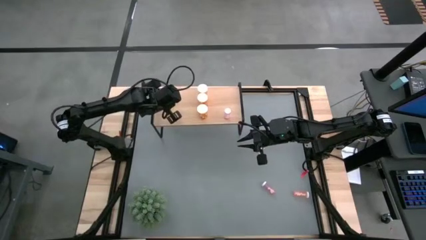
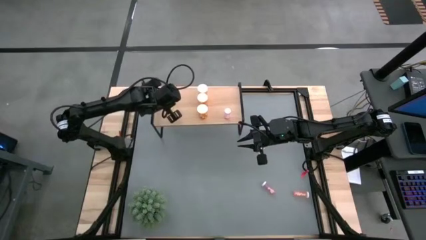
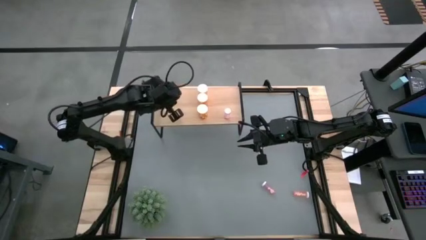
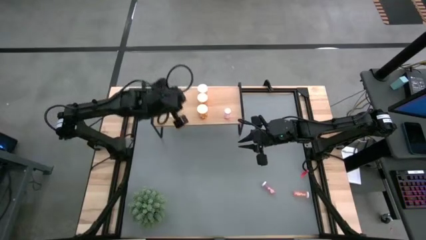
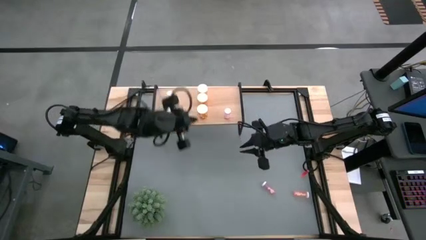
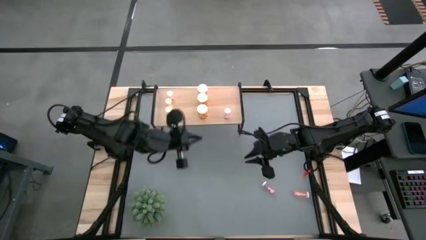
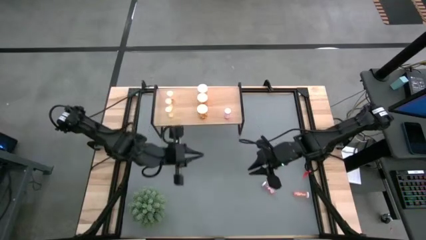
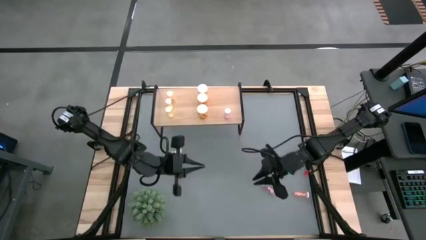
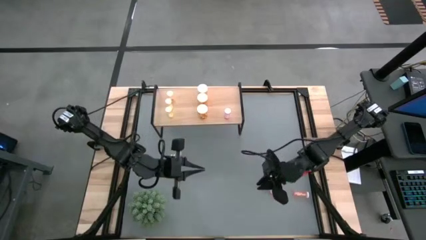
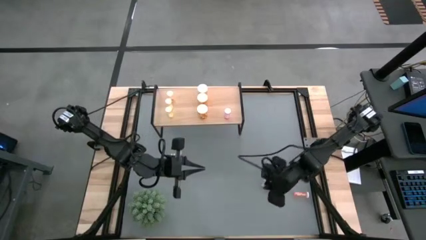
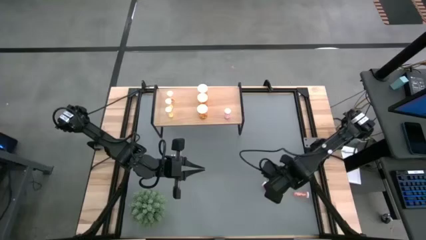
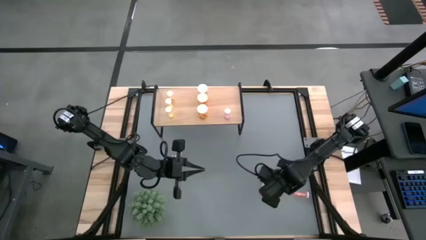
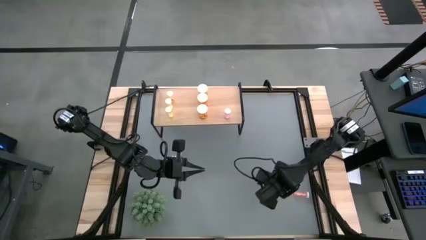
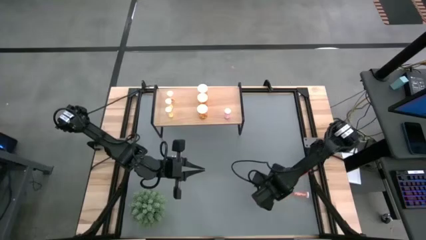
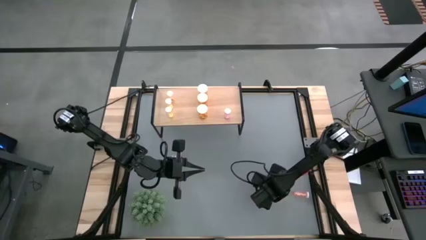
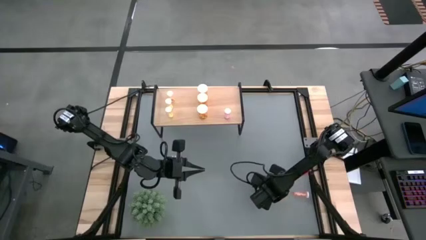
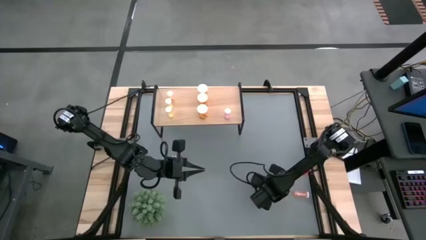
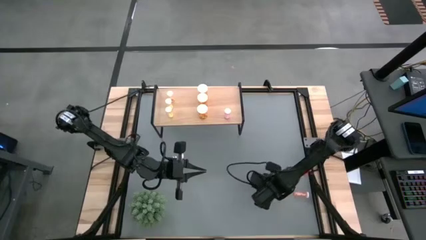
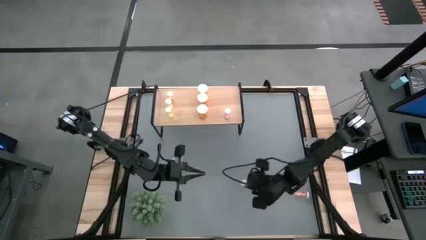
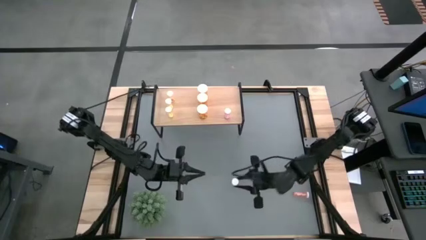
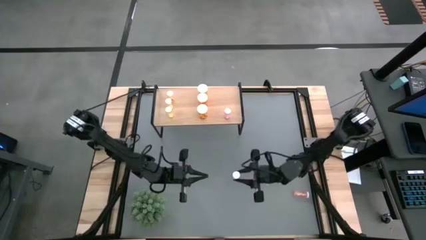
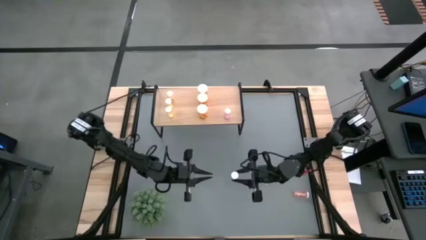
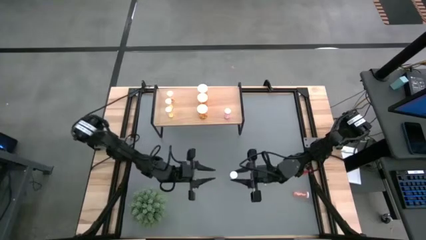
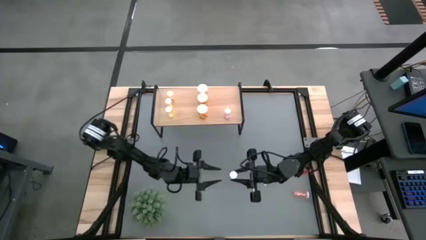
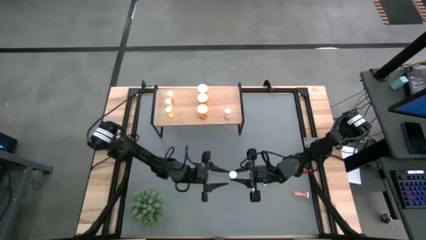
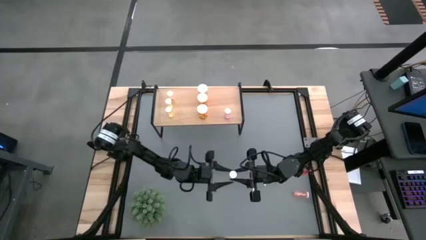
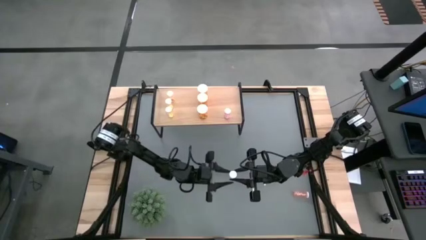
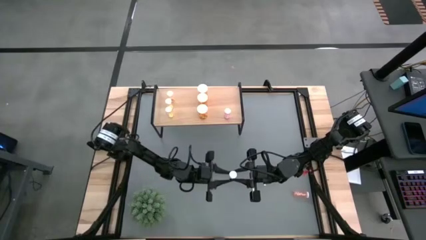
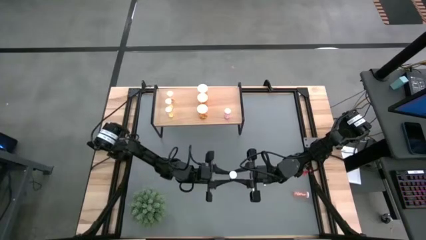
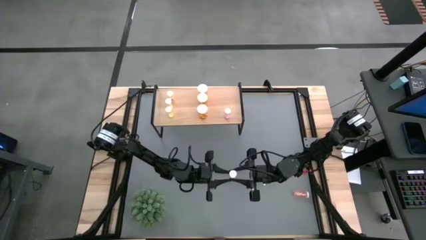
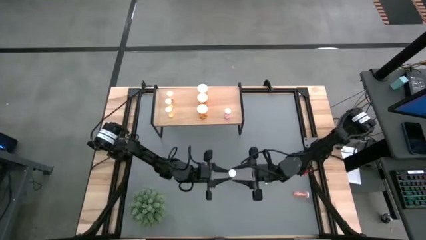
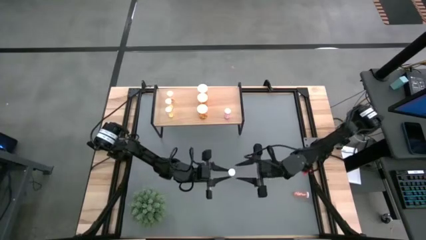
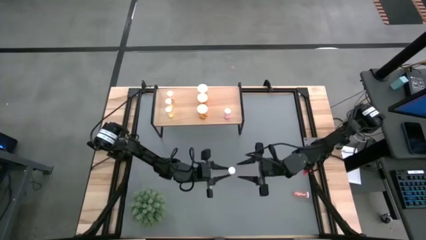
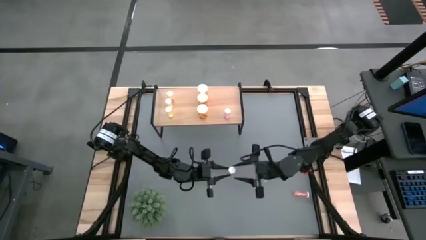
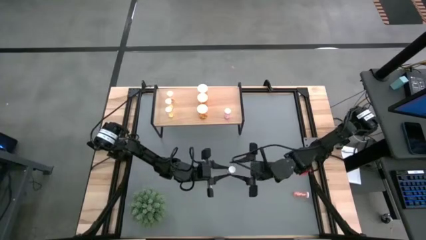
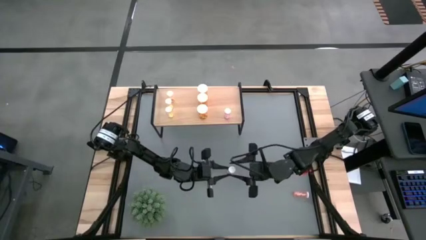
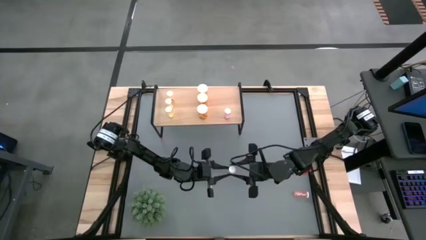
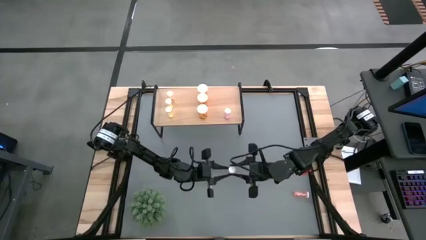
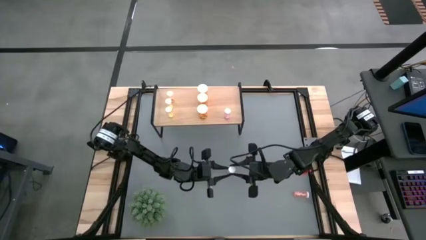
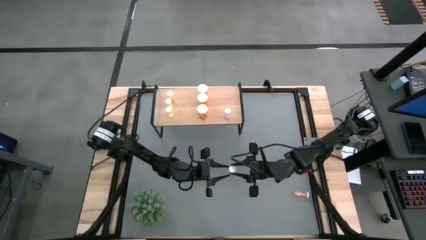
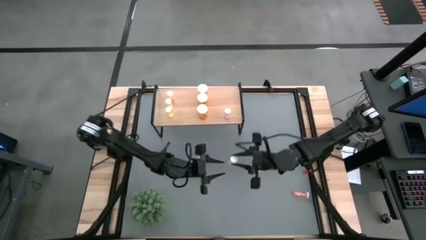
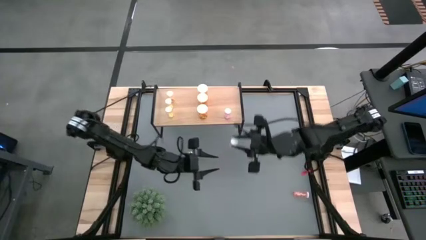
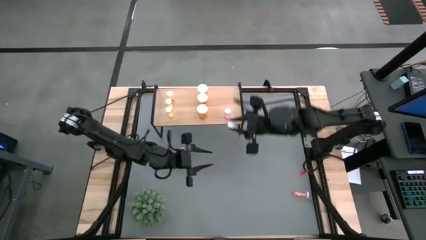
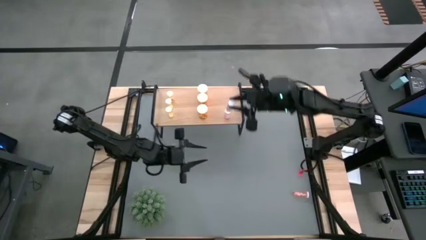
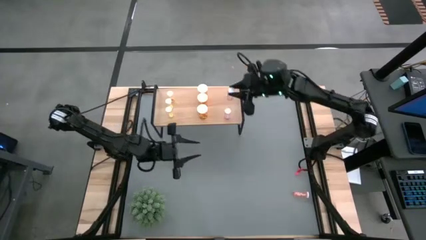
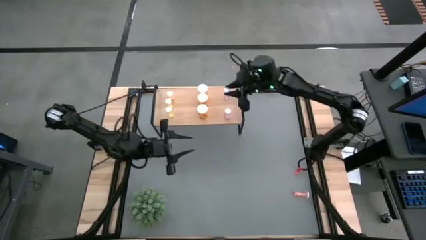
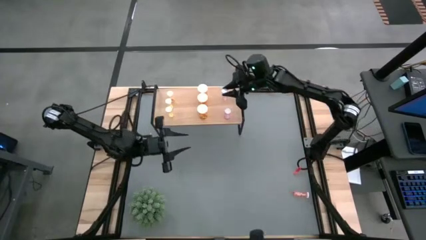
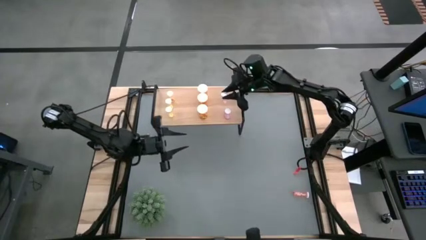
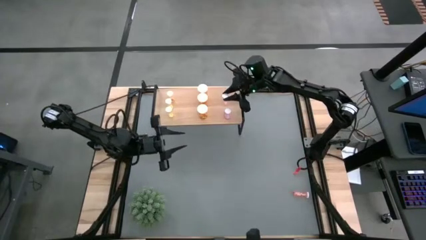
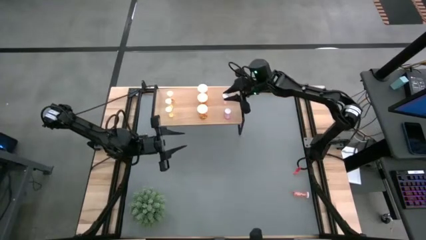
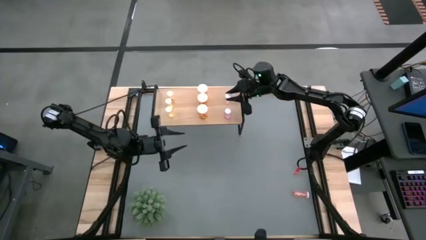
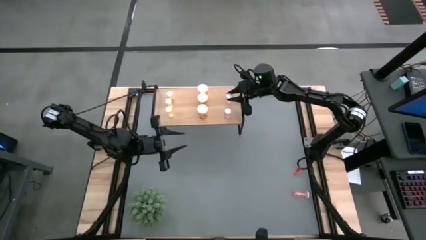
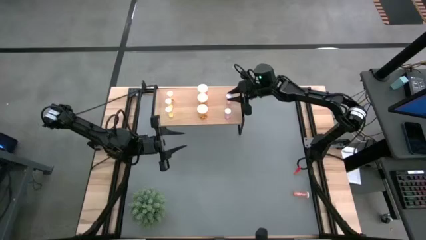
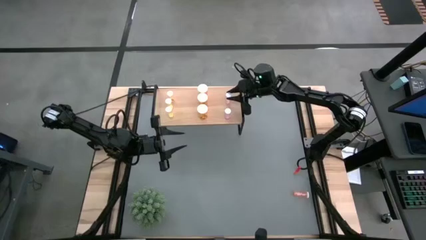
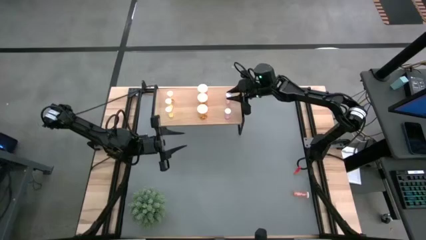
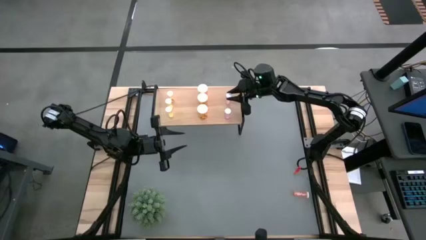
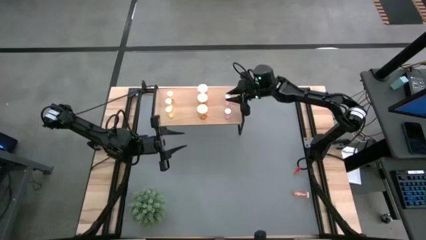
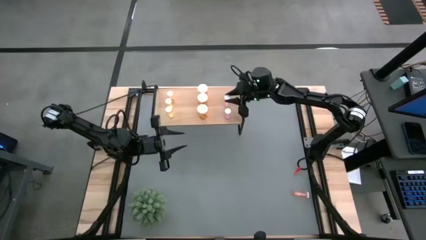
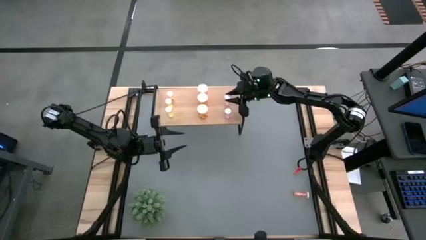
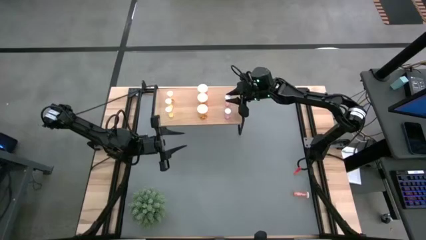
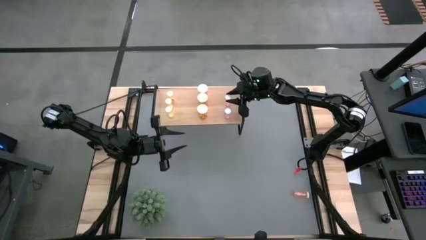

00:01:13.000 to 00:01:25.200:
Task: Pick and place medicine bottles onto shelf by color
Put the pink pill bottle on the shelf aligned with the pink pill bottle

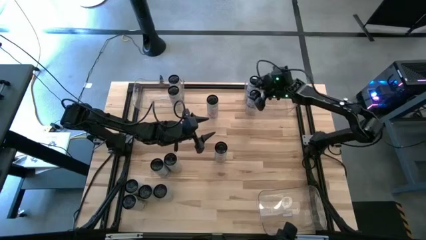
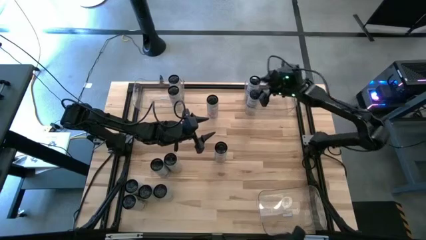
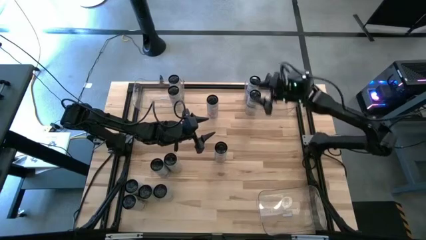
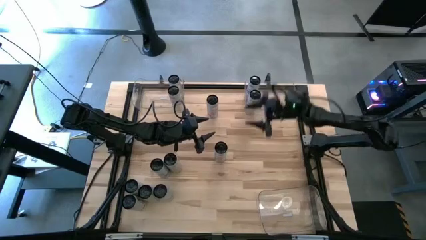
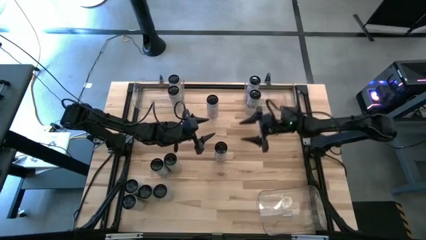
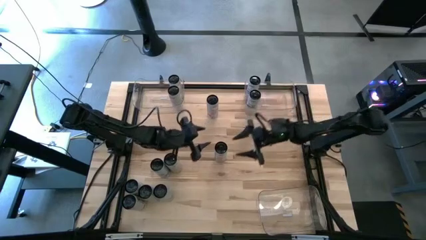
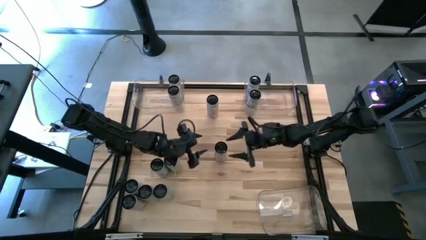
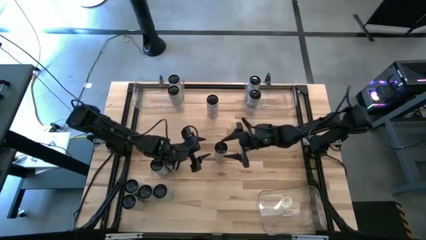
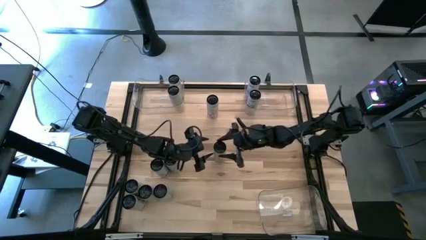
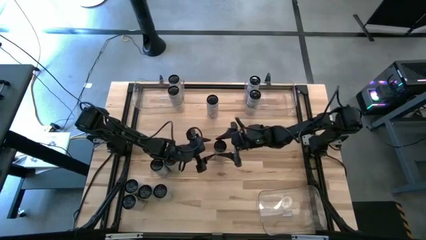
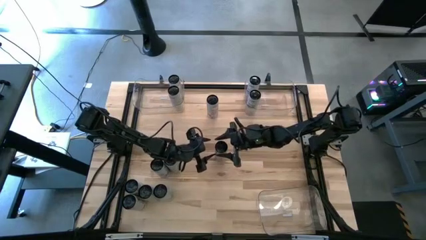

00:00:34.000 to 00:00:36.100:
Task: Sort soda cans
Put the white-pink soda can into the bottom right transparent bin
